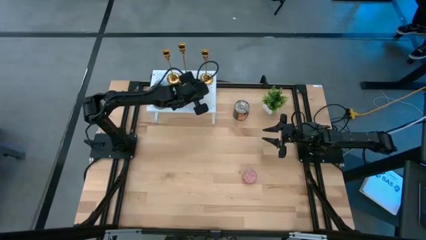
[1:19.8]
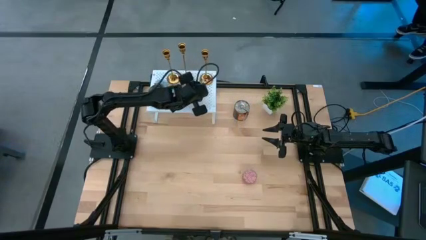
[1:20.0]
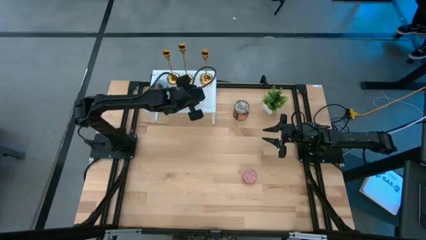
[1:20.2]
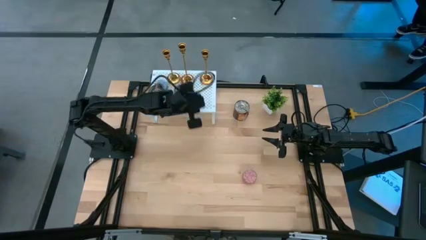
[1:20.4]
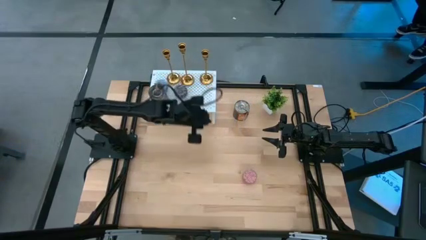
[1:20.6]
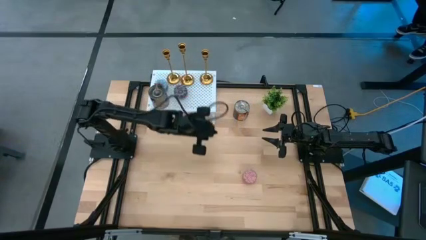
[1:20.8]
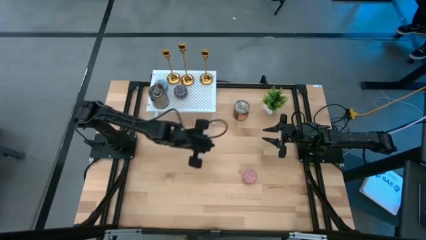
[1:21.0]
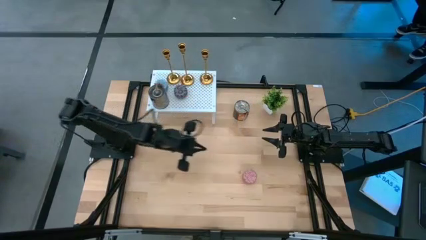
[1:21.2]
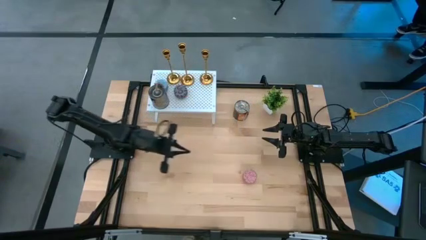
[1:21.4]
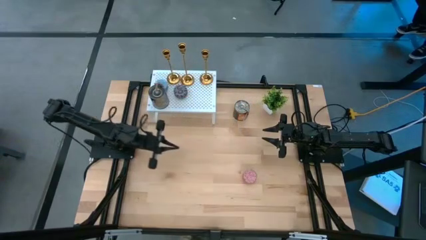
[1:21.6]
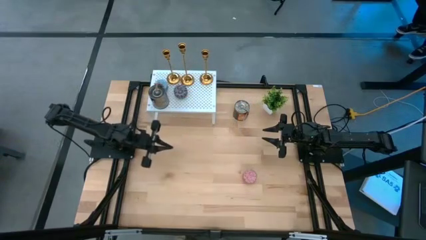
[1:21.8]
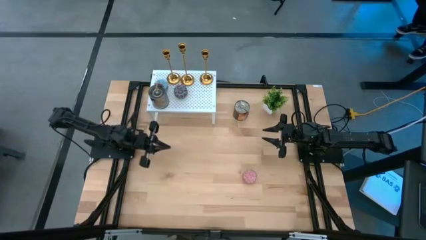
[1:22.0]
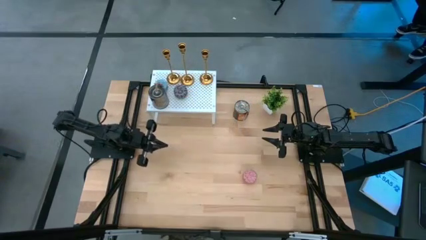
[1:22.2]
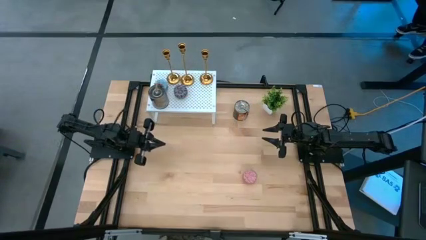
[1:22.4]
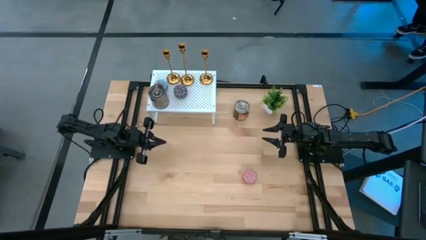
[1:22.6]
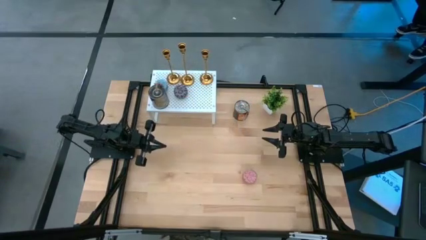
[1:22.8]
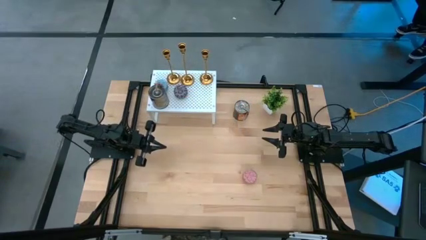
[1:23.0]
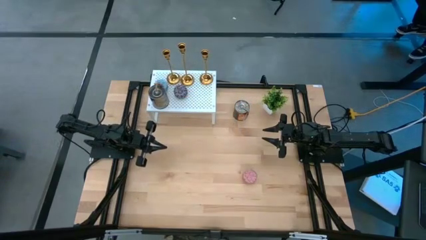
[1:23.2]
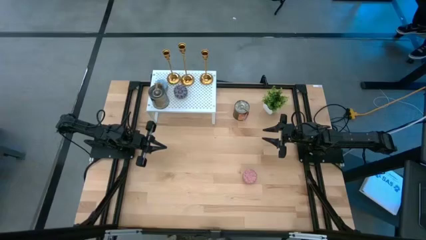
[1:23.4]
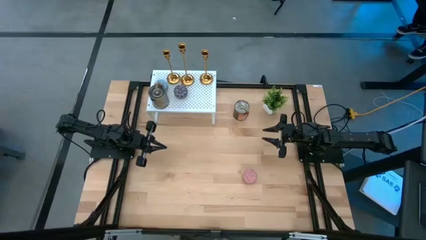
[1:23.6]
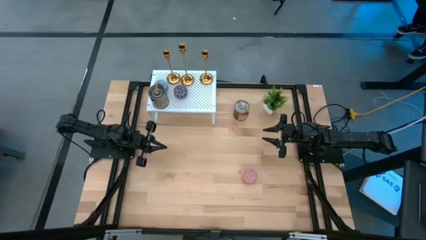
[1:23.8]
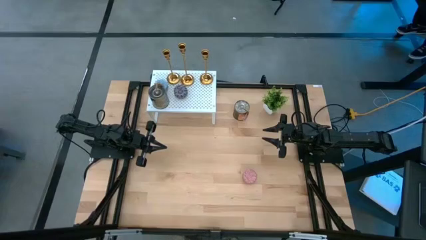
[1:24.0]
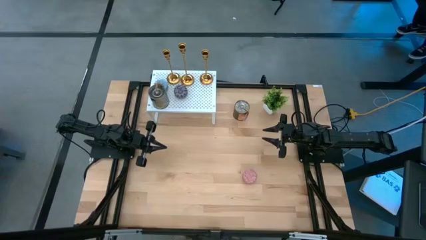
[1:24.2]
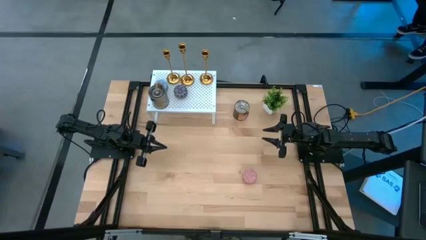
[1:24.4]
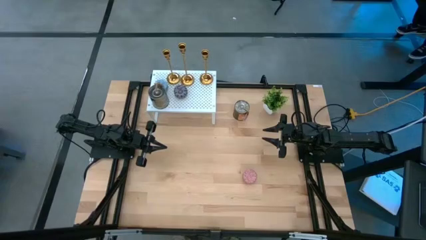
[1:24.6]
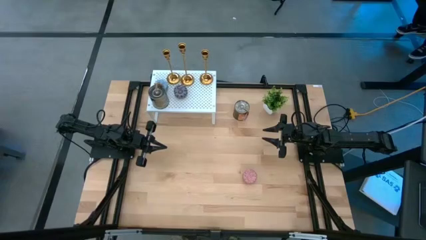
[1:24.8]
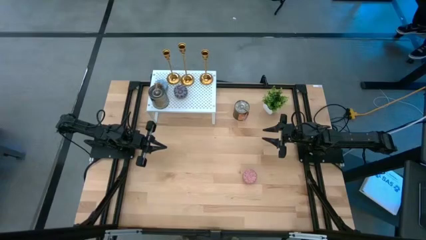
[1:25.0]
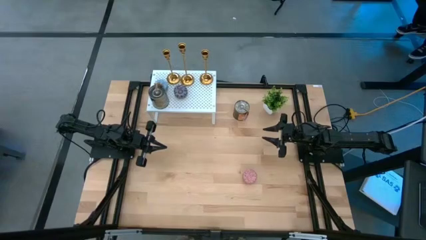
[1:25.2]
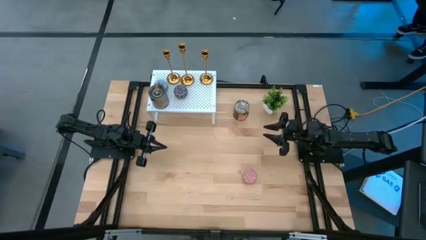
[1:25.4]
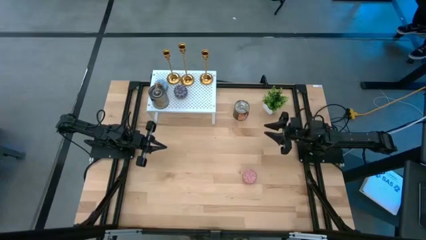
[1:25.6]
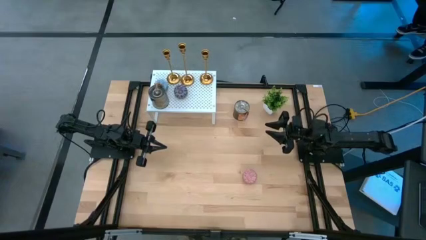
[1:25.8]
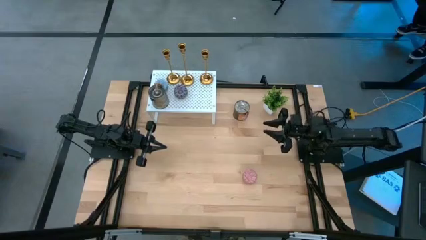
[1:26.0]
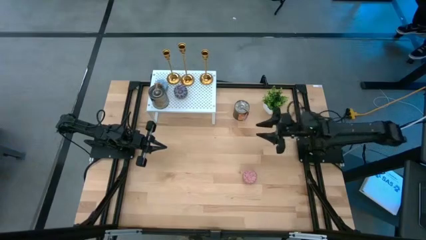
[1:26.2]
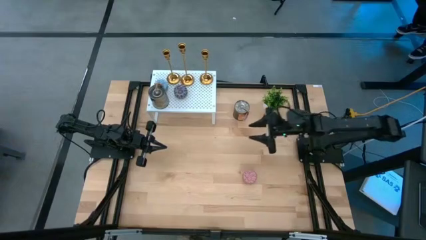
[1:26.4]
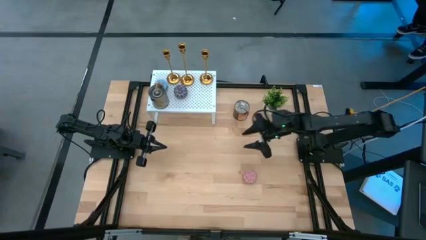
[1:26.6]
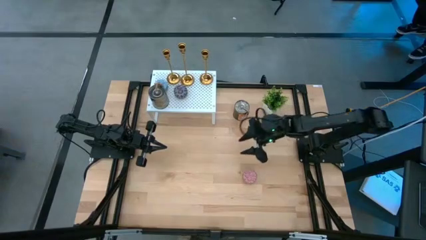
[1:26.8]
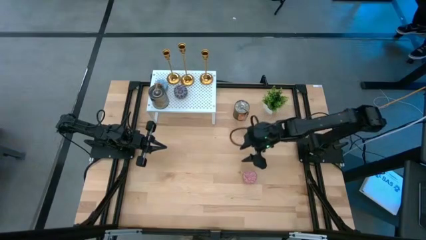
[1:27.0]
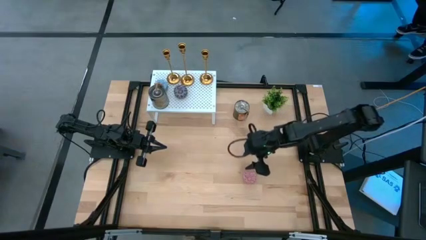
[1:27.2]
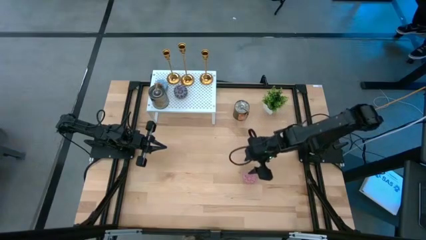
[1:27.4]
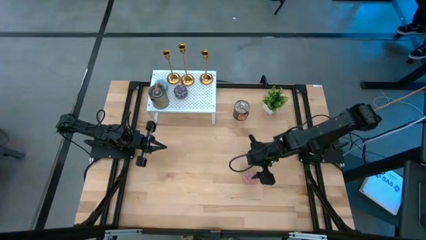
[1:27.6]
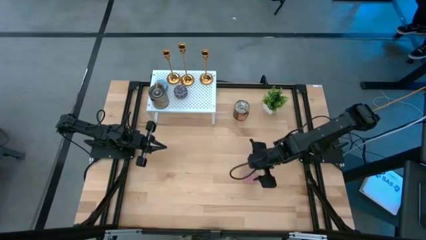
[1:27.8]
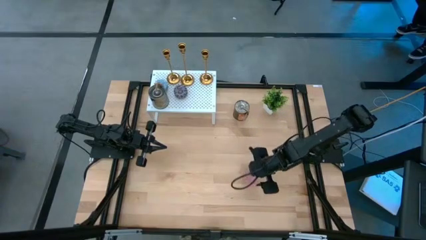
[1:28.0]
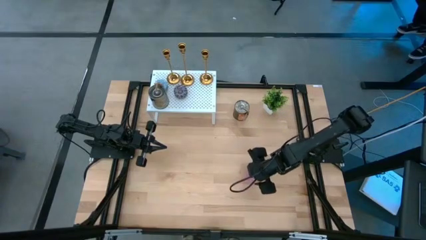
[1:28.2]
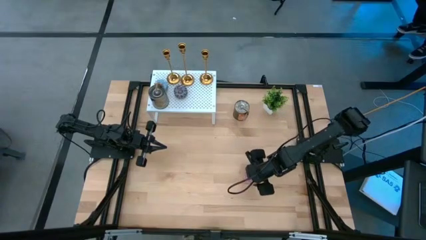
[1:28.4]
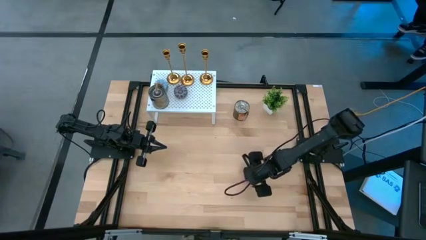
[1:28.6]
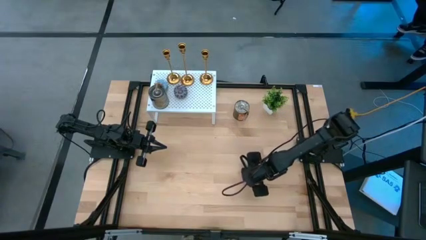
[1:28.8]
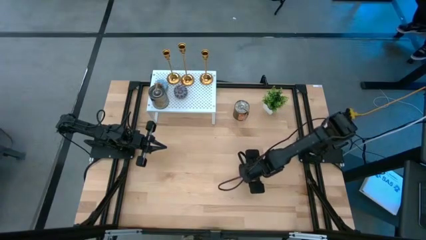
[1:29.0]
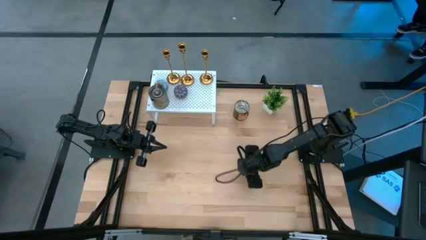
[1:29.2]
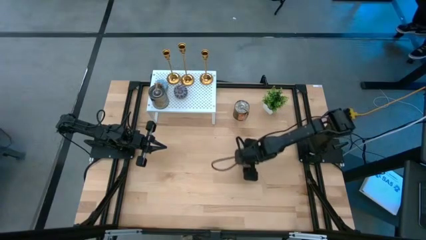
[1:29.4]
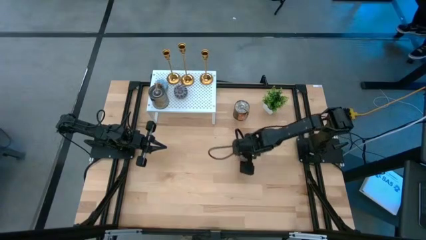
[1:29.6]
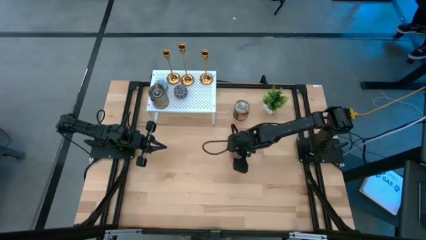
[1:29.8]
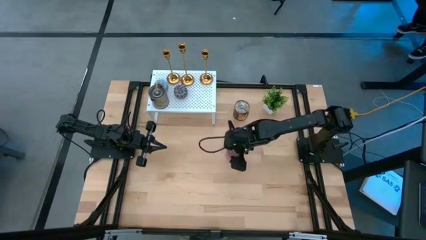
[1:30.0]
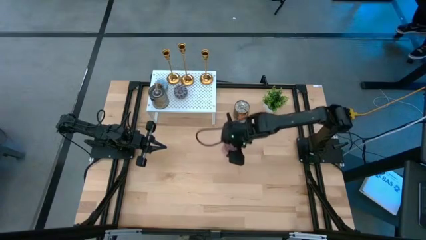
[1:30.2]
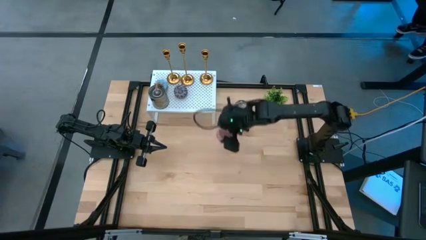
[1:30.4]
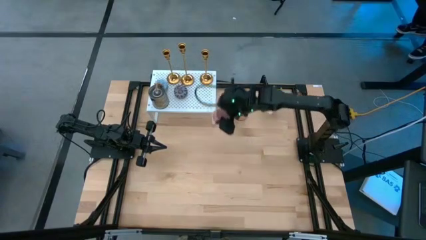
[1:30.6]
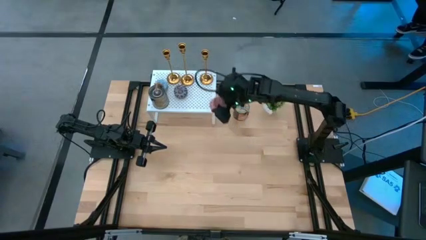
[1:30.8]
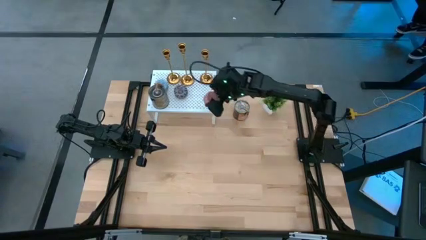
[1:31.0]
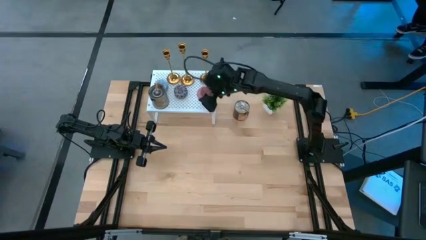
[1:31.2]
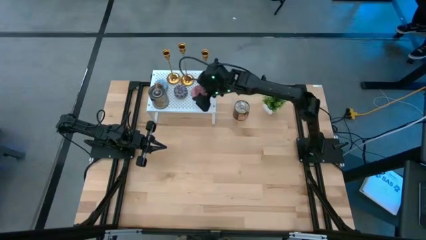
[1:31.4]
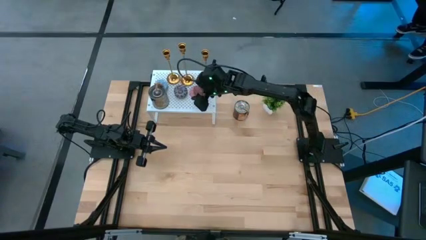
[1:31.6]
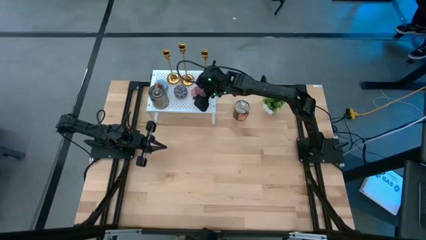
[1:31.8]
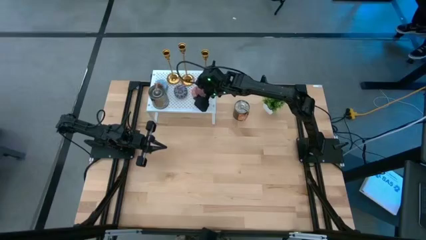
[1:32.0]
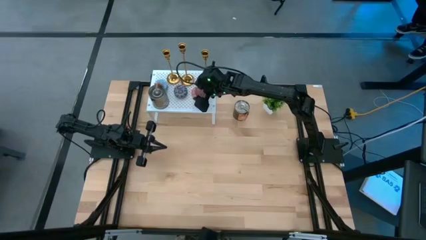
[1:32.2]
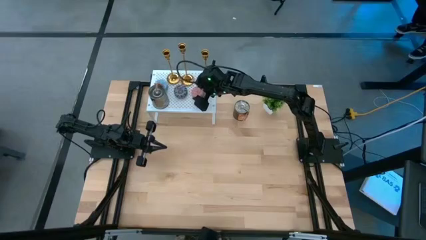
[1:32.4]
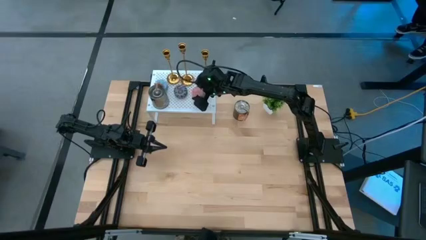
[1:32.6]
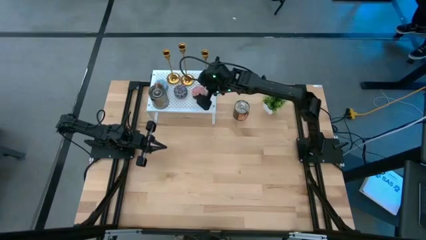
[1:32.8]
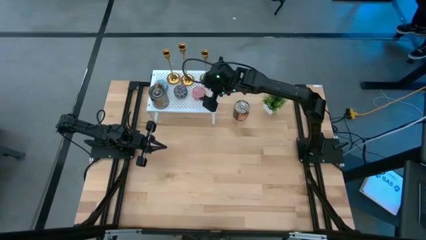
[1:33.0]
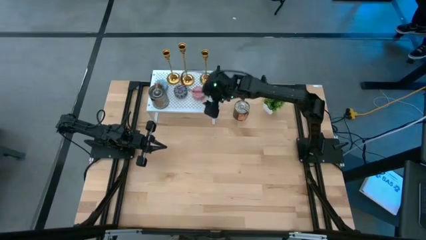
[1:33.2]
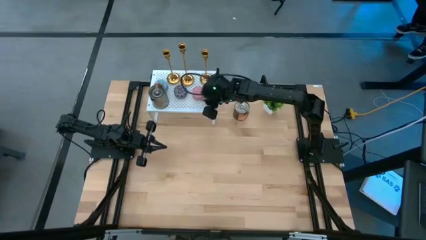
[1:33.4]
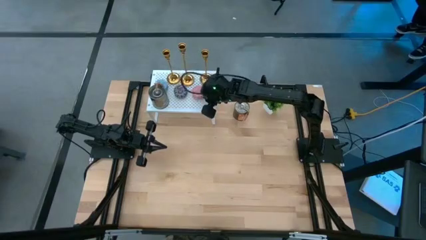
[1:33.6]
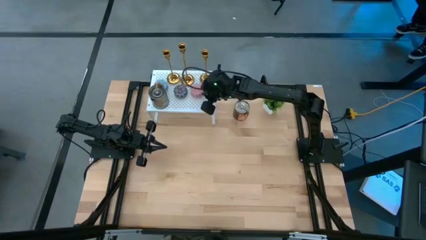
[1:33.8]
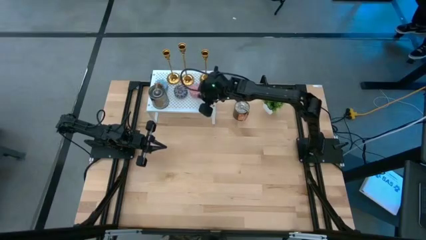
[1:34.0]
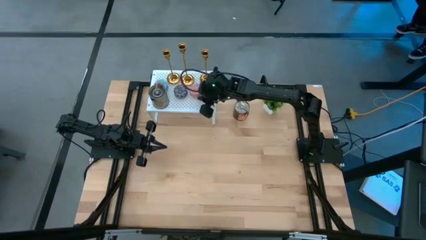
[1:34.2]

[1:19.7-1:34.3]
Task: Pick & Place candle stick holders
Put the pink patterned candle on the shelf
